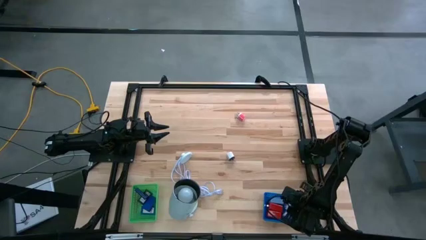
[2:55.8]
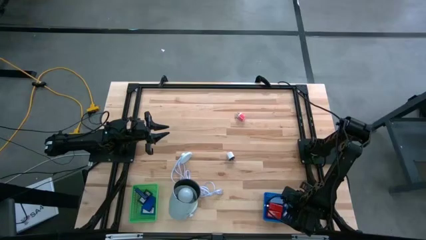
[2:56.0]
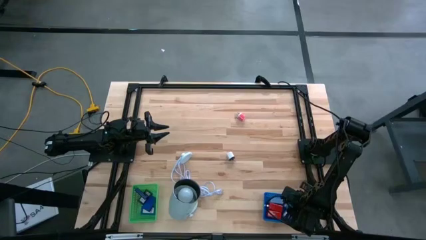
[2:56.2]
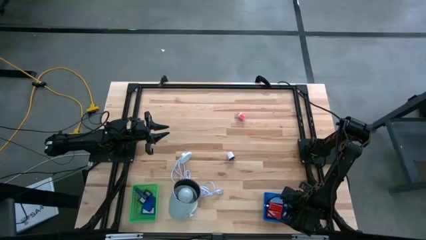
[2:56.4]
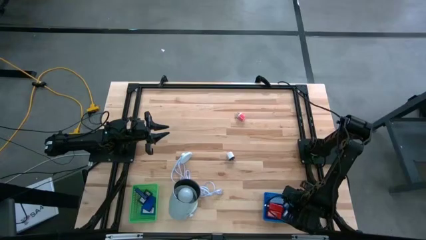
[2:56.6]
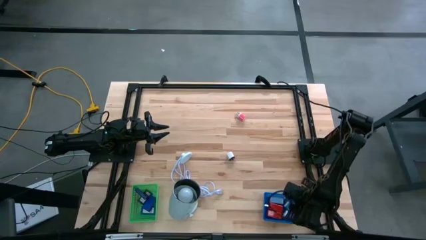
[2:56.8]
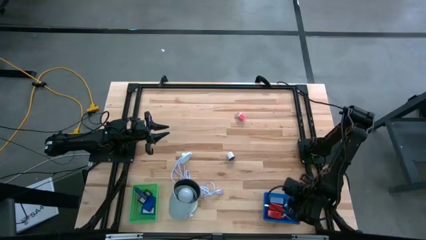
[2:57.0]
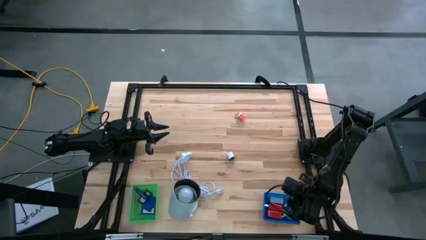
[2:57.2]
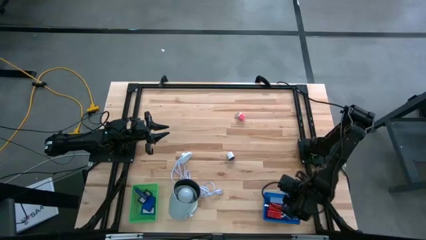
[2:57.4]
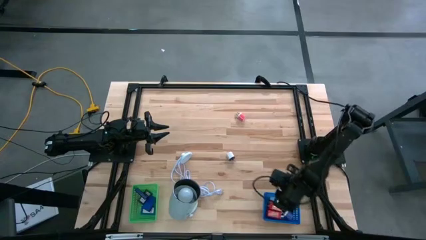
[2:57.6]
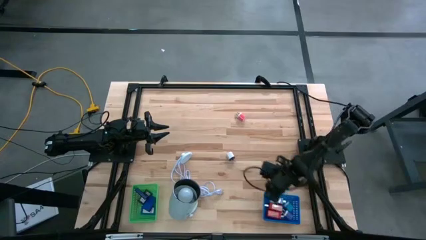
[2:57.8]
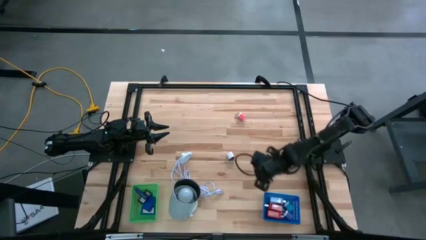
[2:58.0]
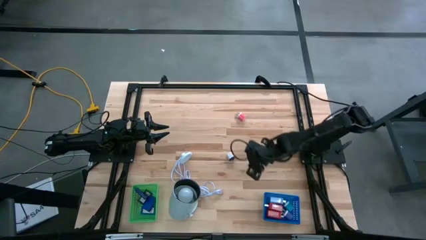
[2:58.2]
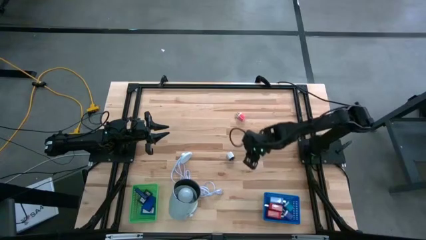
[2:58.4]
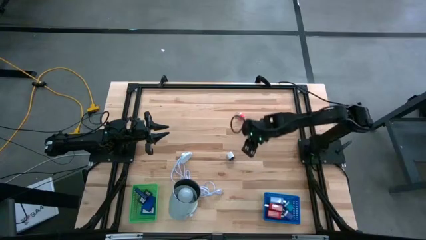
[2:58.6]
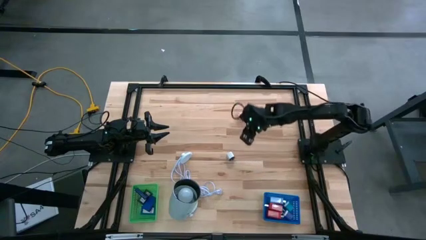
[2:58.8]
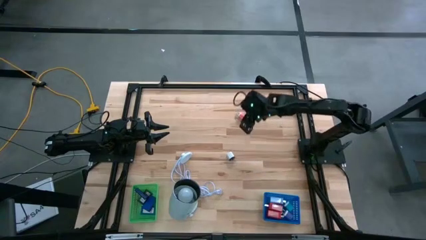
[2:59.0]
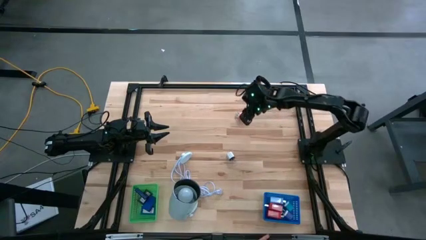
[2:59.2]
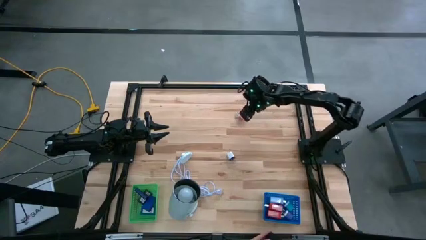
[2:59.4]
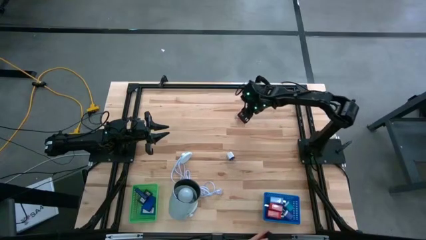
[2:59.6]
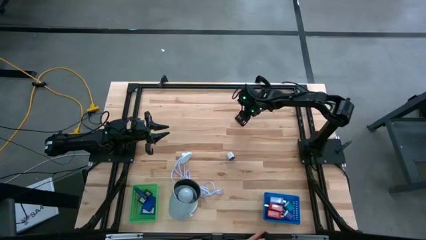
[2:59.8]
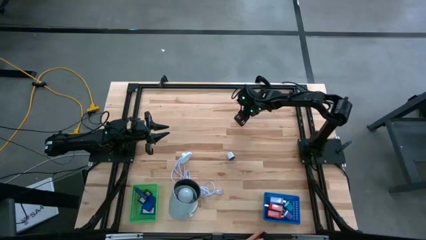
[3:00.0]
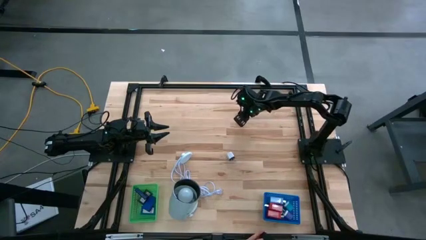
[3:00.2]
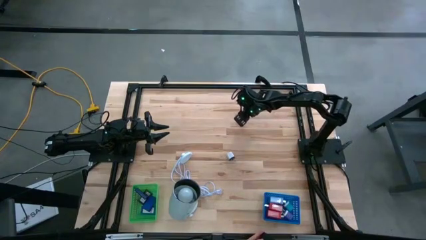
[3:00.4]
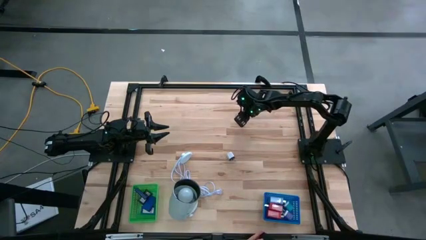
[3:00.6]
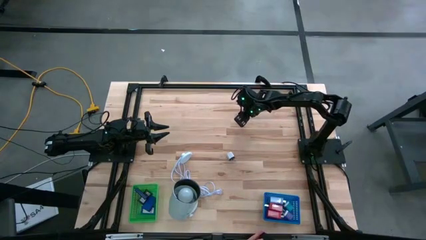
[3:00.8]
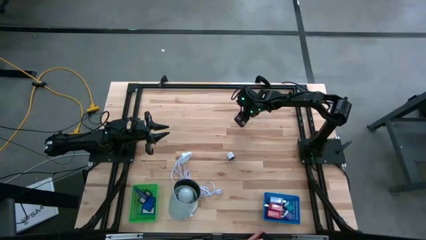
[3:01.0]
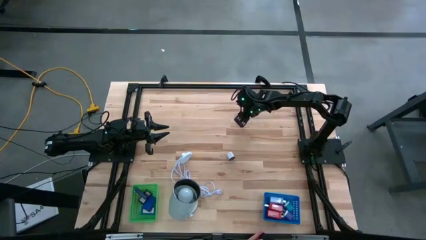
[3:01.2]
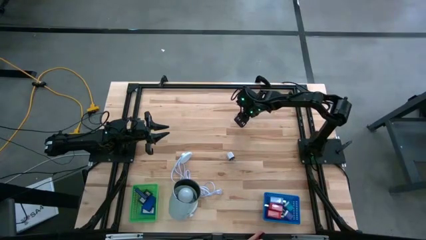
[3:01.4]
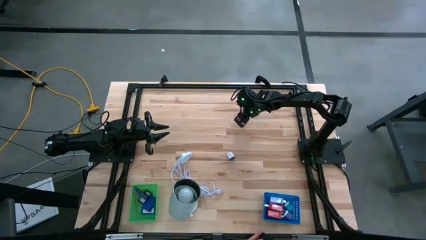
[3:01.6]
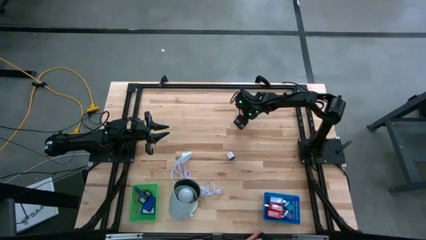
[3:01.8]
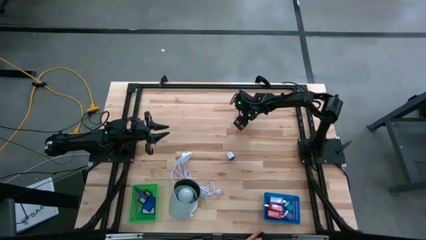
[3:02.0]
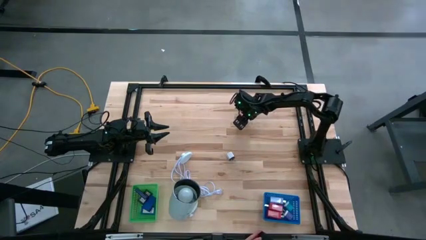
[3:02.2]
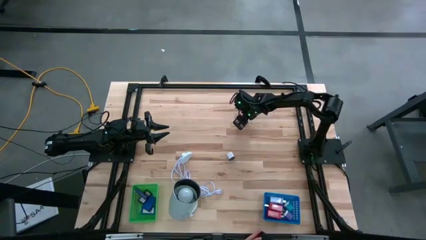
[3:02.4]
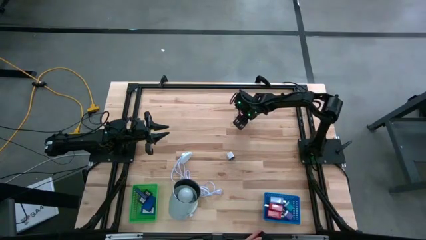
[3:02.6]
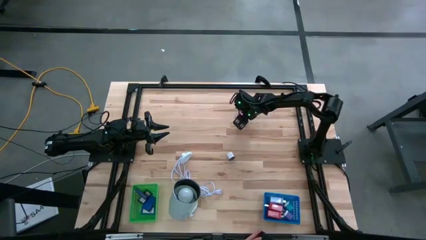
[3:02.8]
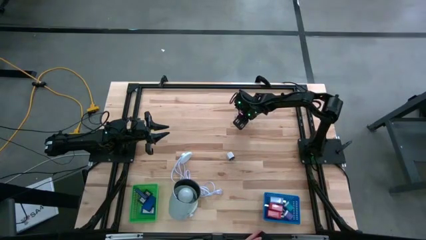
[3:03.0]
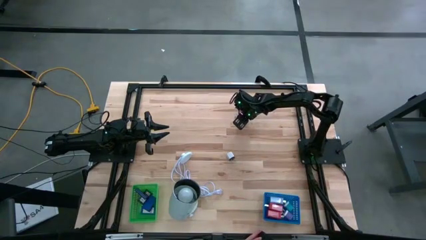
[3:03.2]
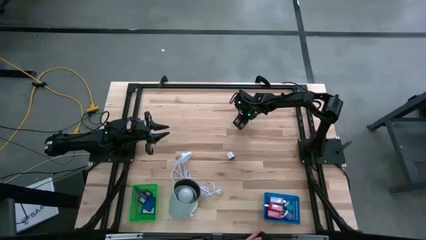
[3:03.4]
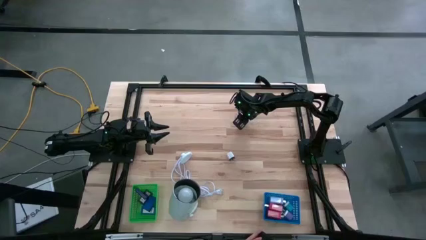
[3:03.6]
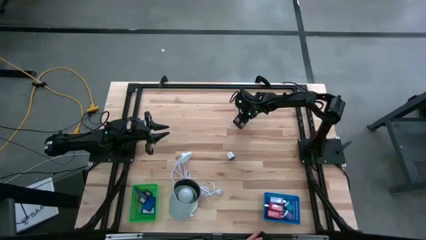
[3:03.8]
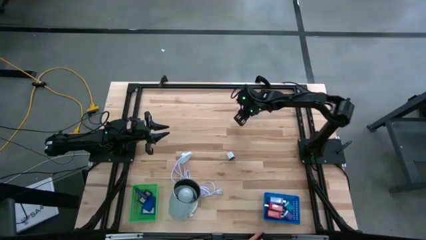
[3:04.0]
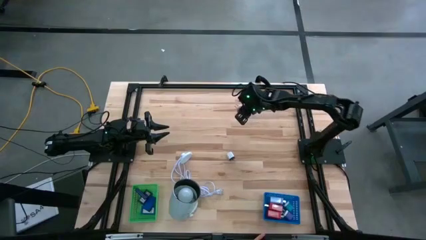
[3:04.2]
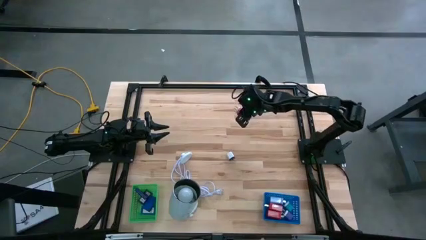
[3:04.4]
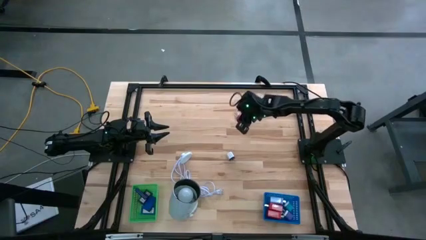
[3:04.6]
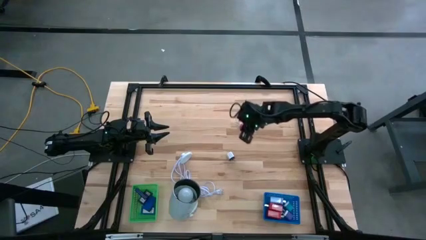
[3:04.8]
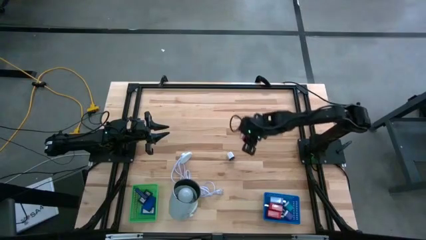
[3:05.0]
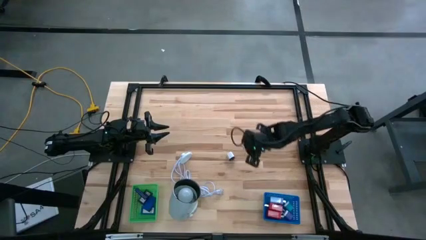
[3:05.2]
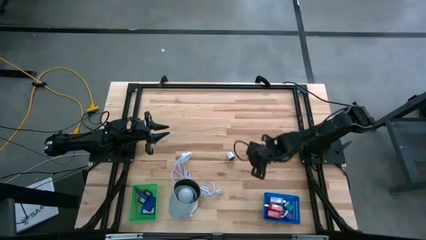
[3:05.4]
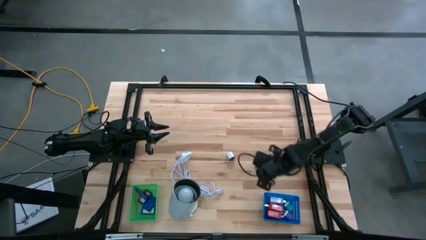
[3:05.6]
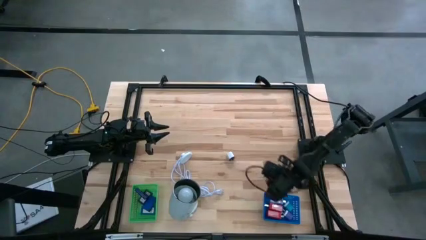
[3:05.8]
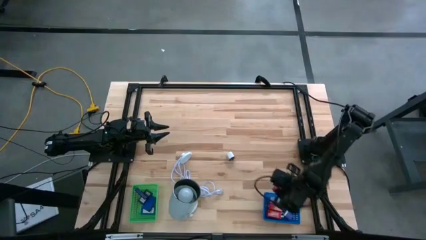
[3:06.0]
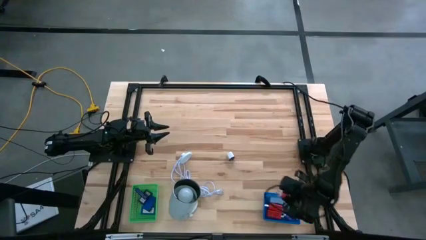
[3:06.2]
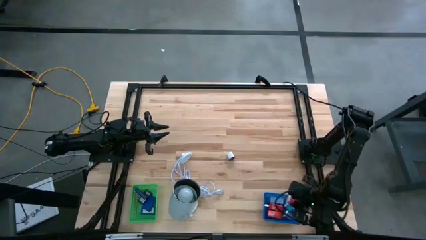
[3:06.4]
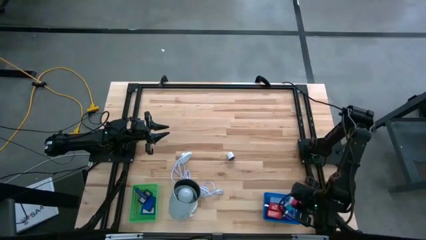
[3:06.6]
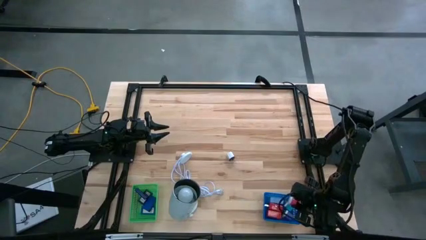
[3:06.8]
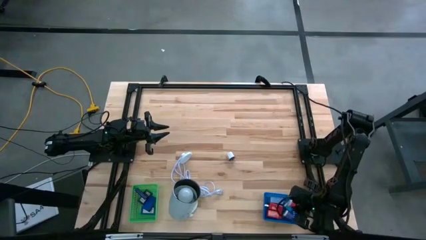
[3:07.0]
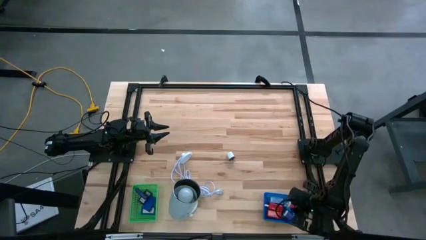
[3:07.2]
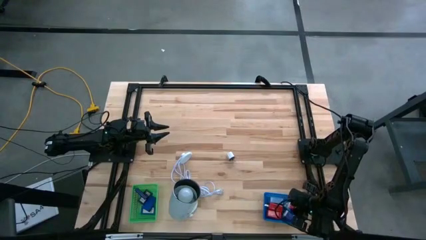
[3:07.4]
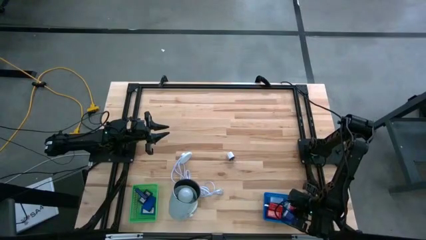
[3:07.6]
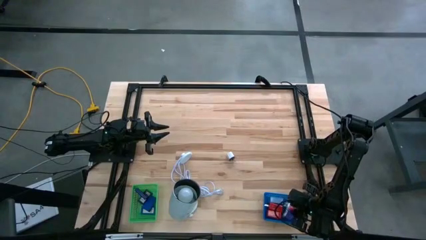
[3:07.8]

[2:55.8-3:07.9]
Task: Pick & Place Office items
Put the pink charger adapter into the blue basket

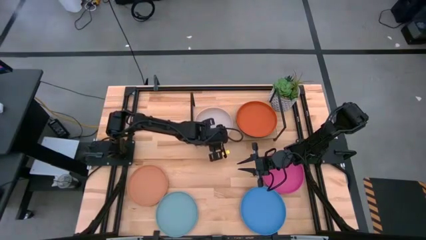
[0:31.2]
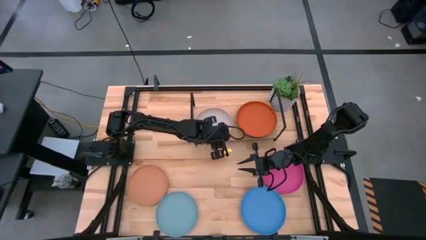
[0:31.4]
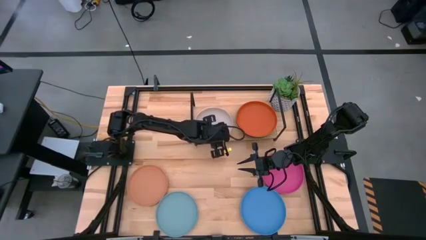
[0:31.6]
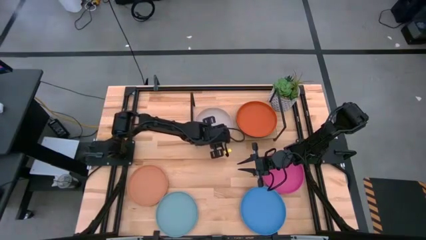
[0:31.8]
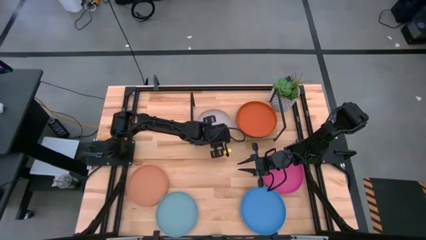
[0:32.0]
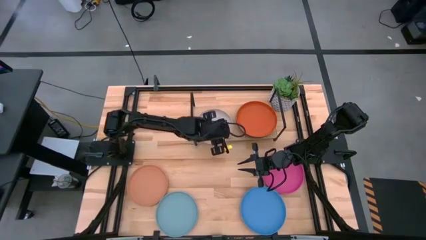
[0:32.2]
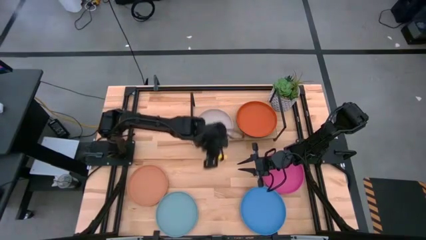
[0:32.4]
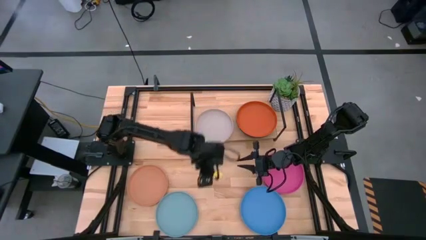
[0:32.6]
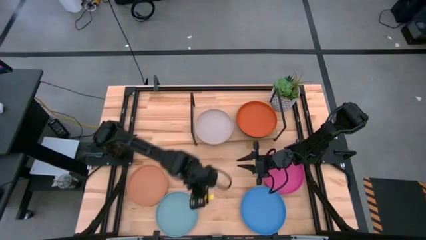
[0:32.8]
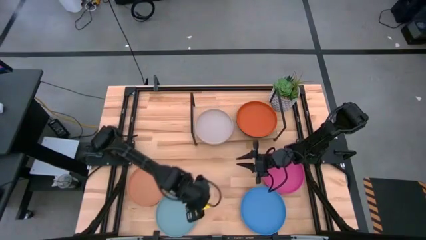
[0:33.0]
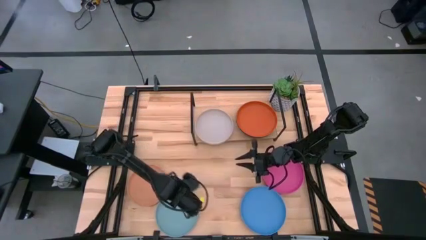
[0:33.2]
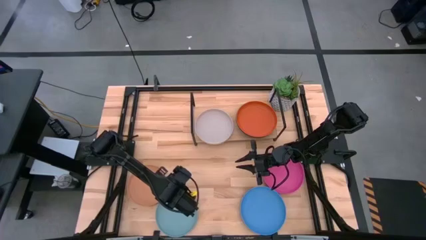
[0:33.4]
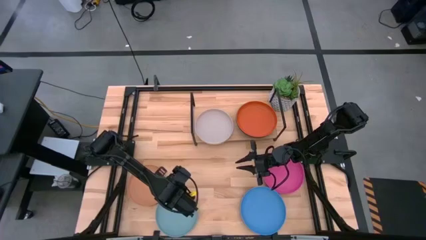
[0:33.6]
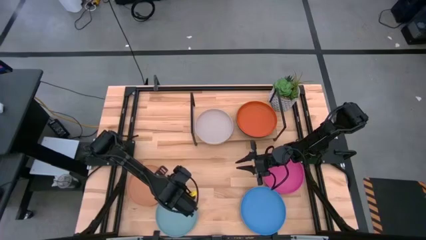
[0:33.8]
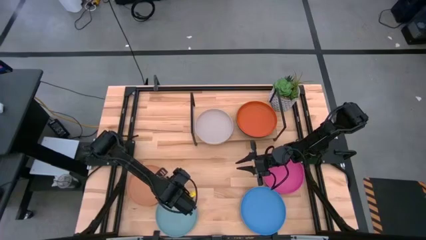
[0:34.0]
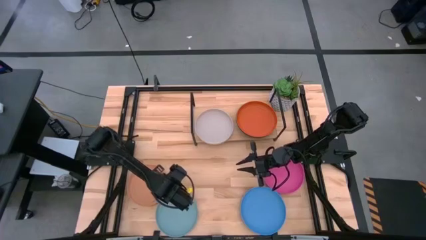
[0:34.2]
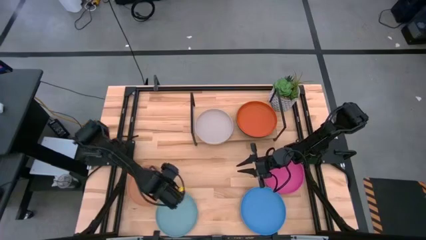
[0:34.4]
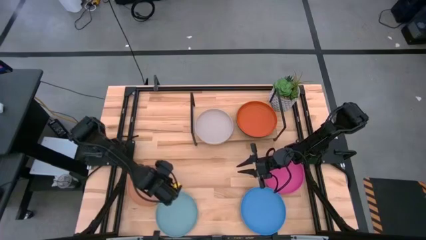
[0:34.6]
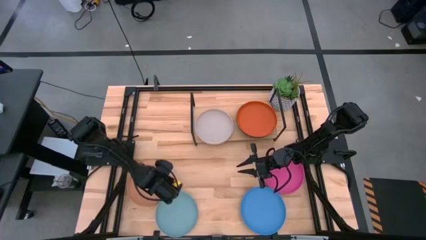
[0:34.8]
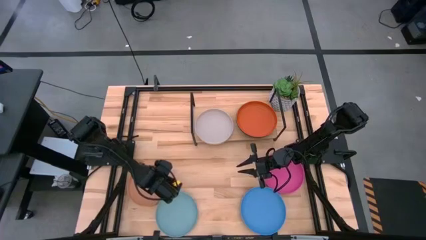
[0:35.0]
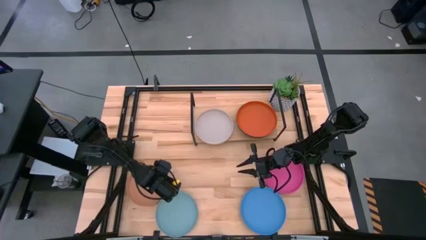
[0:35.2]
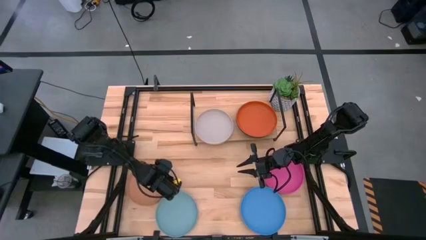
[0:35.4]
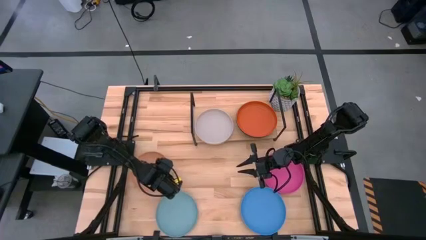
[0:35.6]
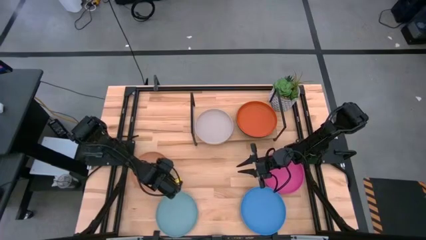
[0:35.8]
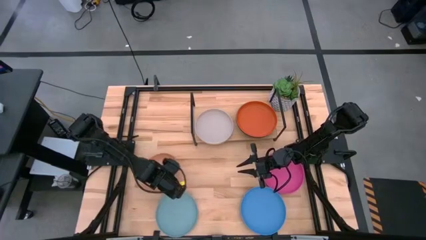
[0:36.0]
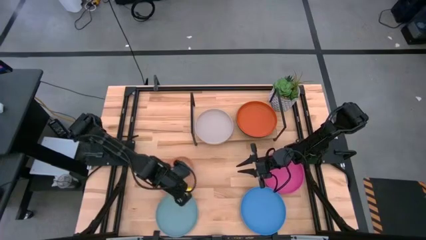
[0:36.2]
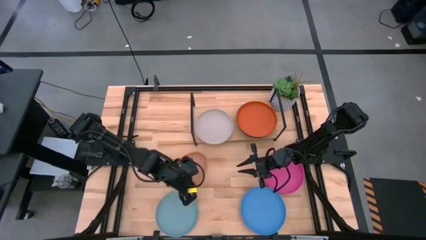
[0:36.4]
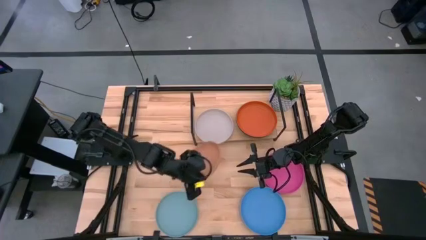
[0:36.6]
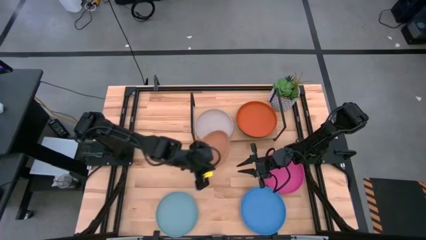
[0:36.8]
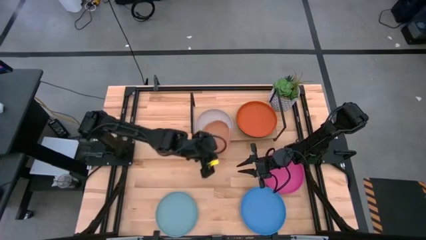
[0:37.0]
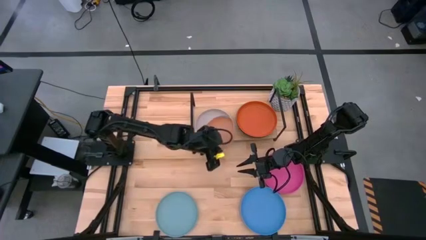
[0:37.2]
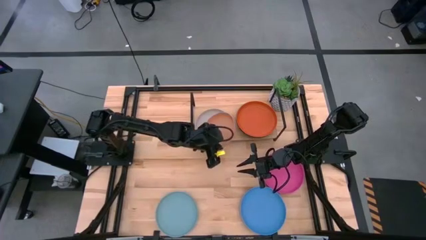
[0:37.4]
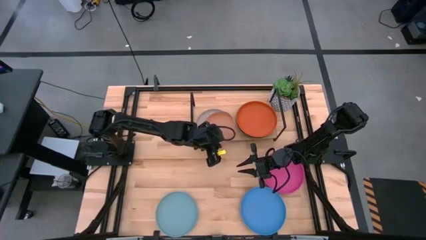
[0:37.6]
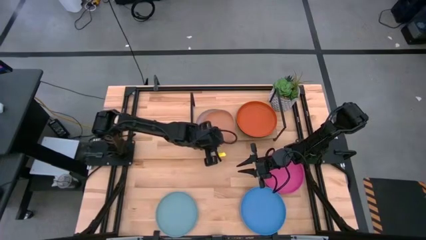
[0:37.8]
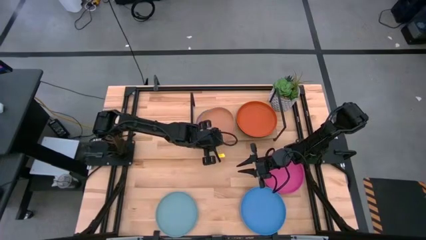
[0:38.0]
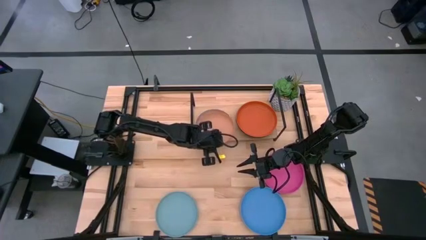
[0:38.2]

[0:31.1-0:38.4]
Task: Place and stack plates onto a shelf
Stack the brown plate on top of the gray plate on the shelf
